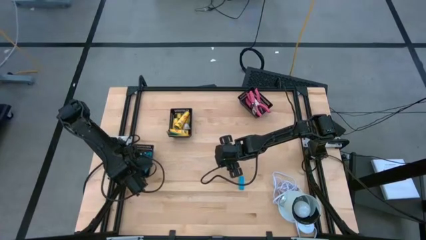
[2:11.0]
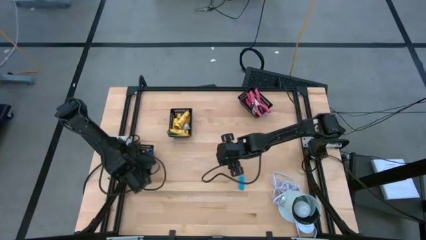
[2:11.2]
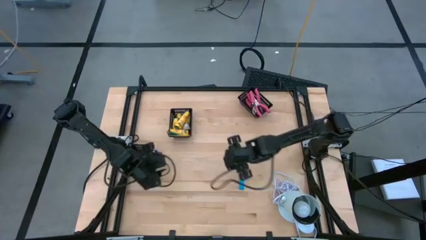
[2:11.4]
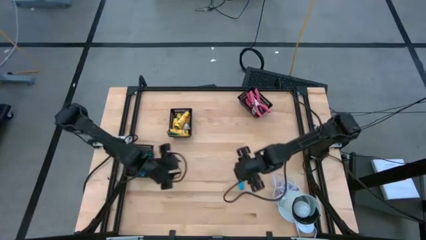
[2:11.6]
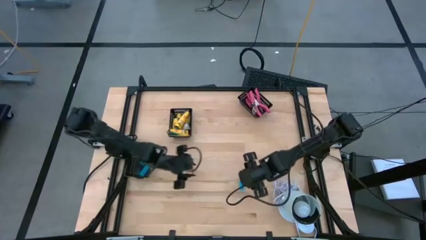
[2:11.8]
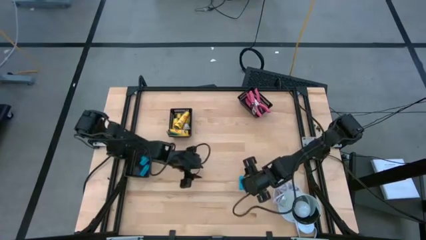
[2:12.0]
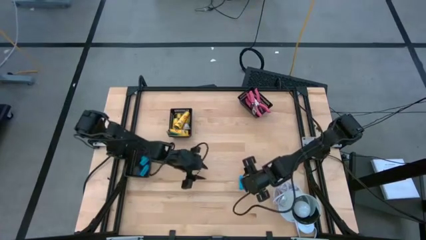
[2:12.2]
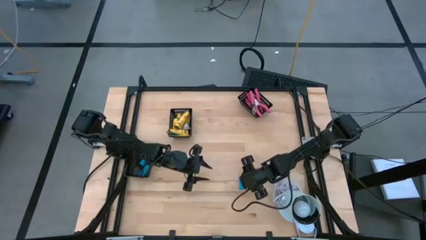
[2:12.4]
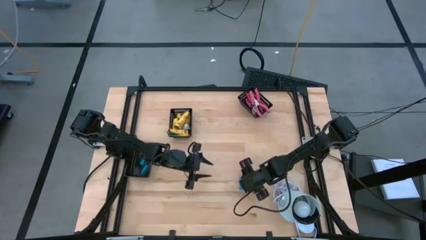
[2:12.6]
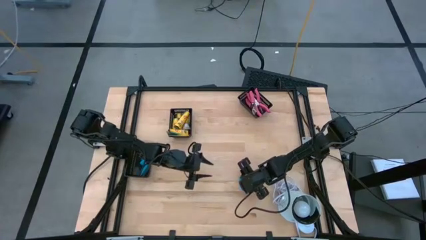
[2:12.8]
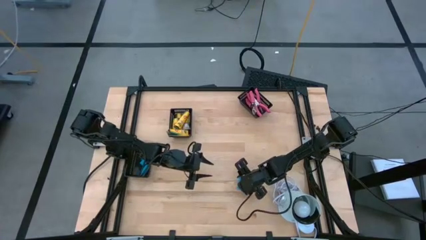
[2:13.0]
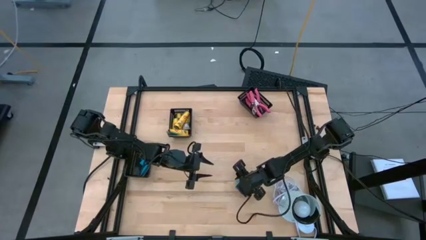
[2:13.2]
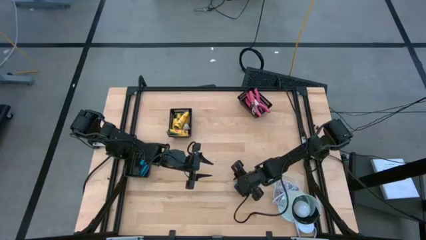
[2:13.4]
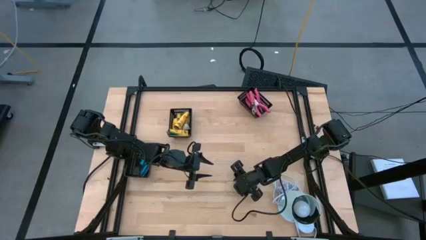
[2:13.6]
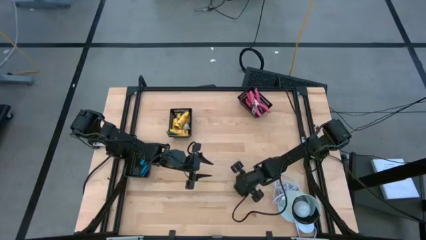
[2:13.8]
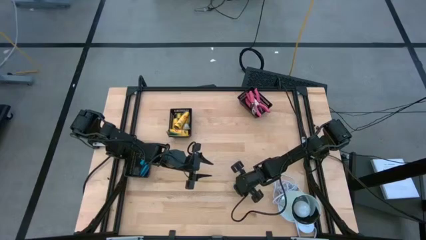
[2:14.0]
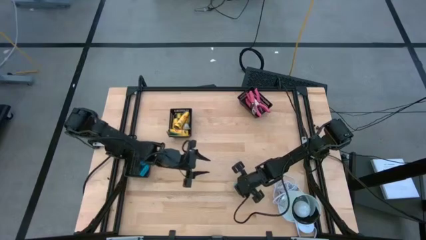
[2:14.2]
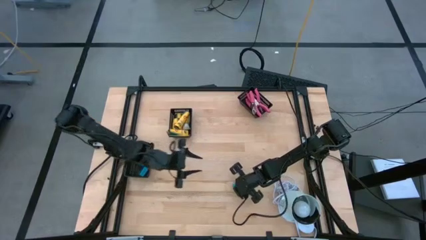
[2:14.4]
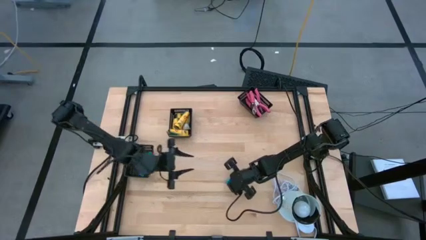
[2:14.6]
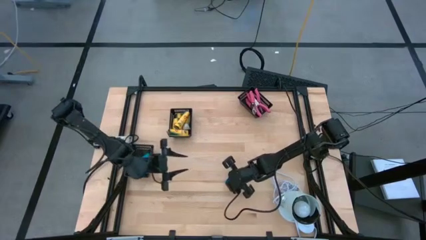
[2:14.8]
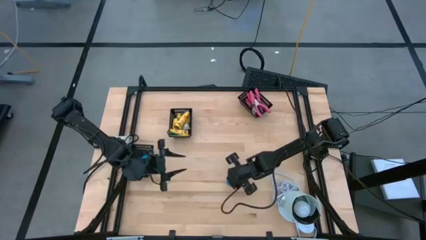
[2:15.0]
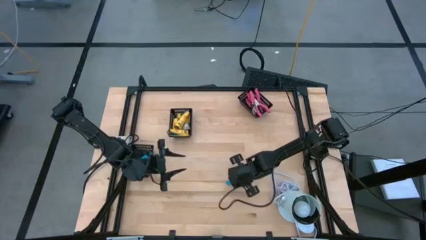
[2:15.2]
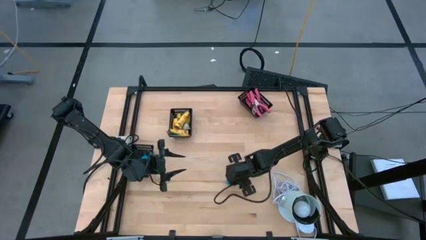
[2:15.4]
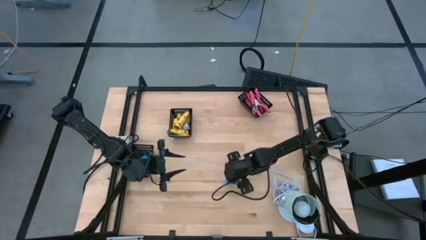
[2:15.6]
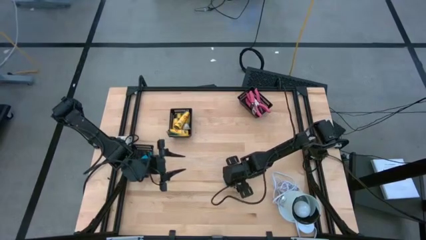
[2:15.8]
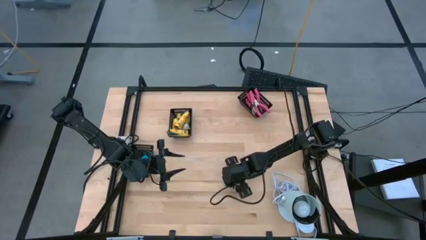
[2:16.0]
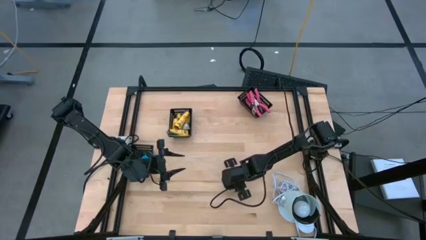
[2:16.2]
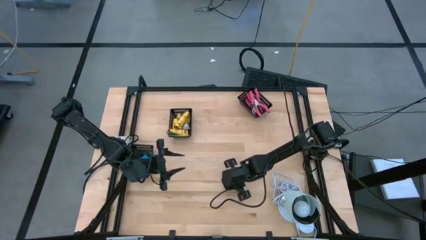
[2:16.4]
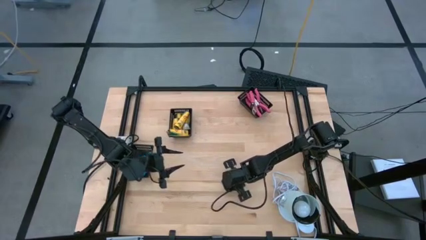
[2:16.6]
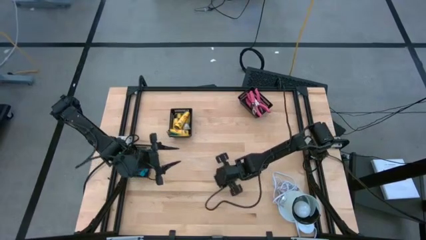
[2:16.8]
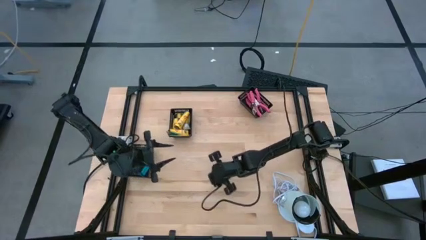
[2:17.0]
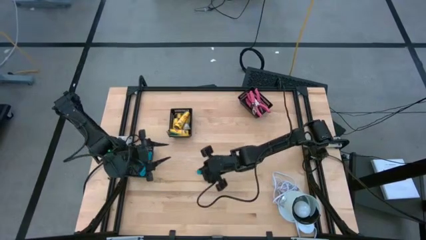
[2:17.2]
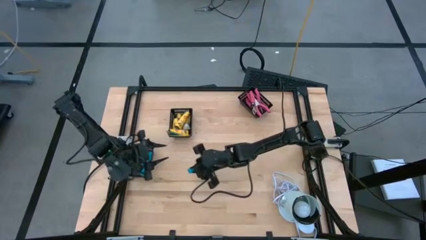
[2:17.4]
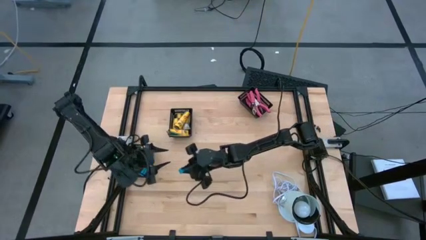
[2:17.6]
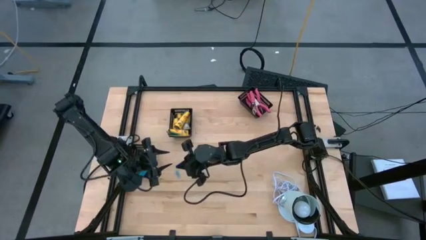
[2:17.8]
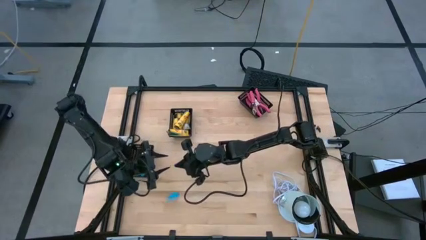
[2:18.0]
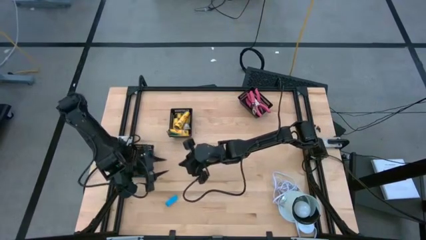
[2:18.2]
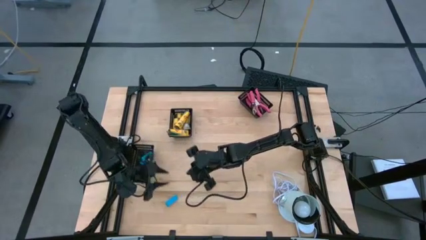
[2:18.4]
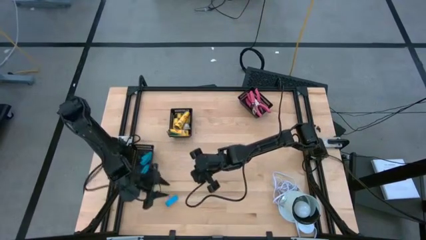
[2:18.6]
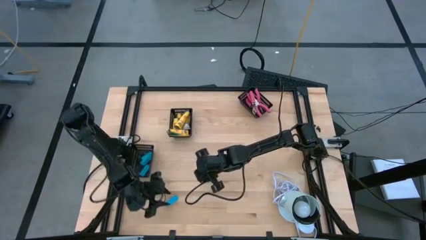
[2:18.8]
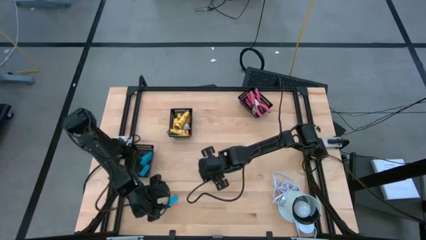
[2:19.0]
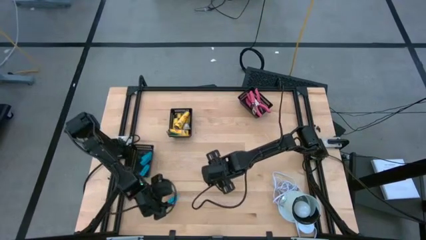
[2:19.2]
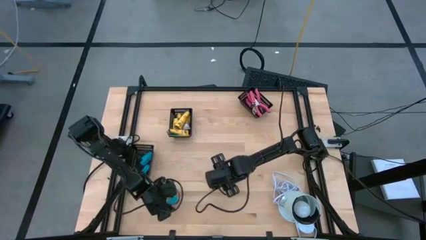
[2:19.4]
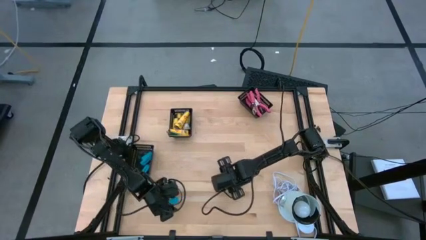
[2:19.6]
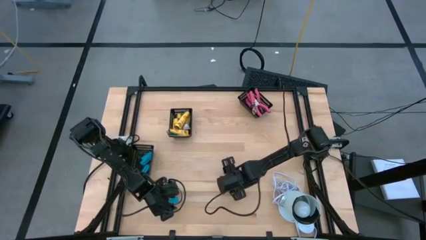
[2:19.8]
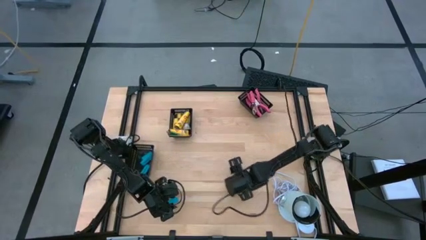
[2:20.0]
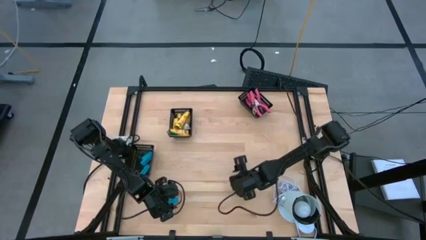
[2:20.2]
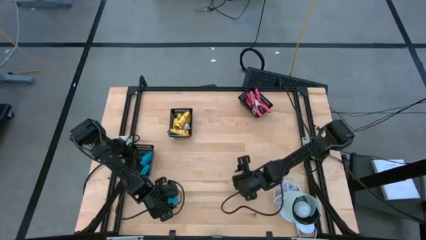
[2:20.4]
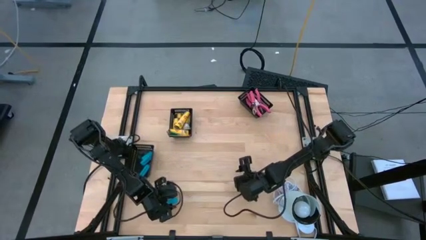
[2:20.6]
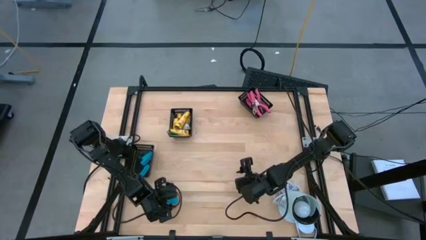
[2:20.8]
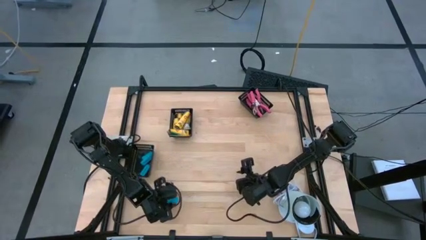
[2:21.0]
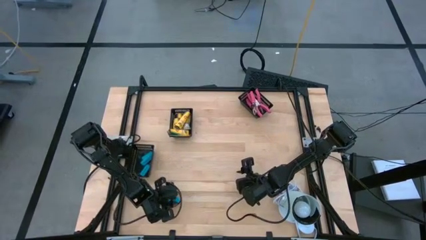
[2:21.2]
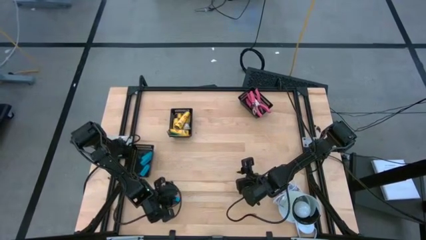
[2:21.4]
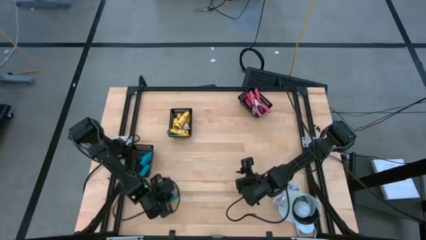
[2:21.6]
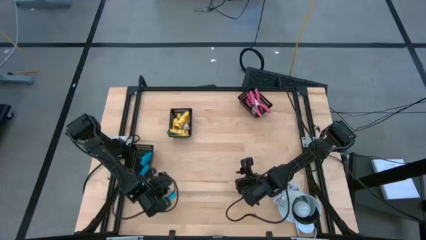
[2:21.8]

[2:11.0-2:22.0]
Task: Pick & Place School Supplies
Put the blue eraser into the bottom black bin

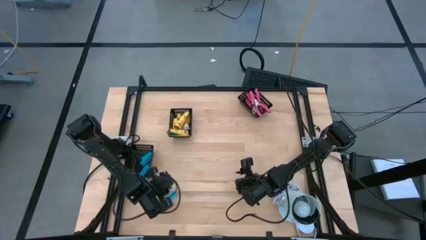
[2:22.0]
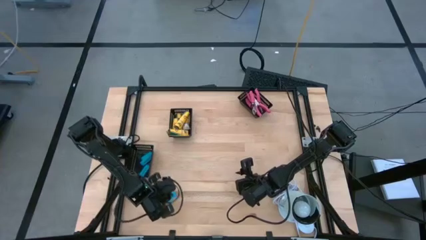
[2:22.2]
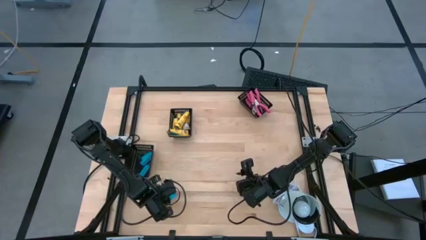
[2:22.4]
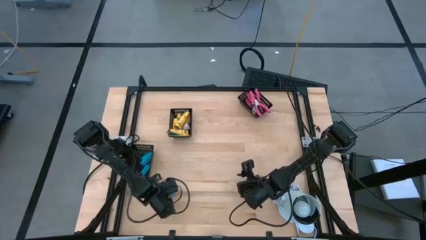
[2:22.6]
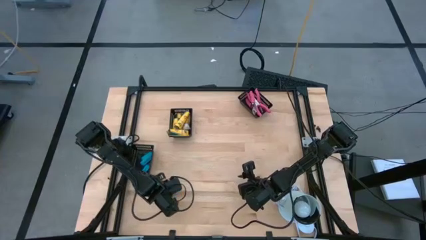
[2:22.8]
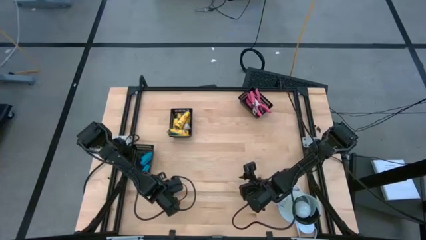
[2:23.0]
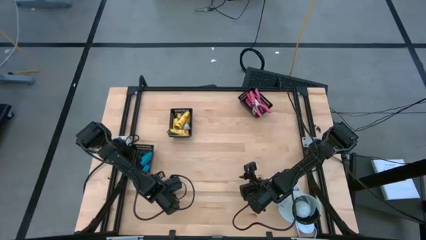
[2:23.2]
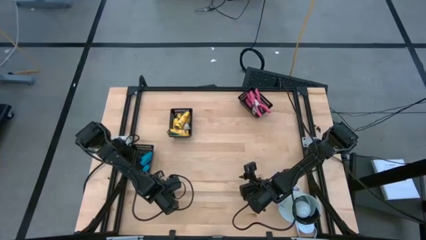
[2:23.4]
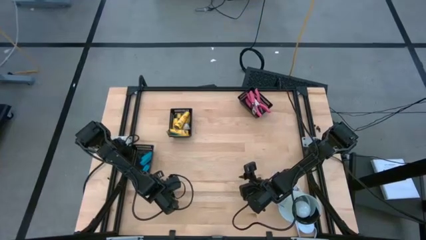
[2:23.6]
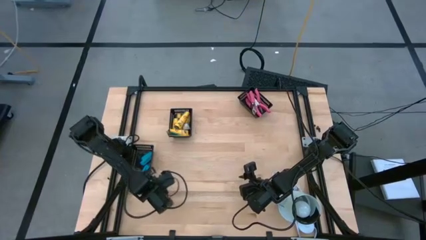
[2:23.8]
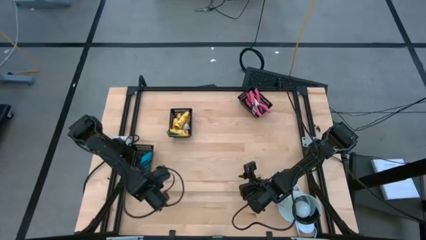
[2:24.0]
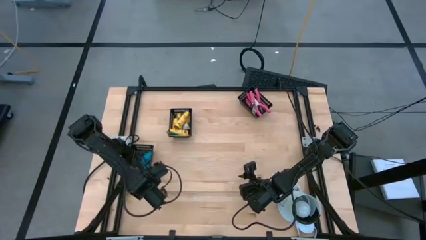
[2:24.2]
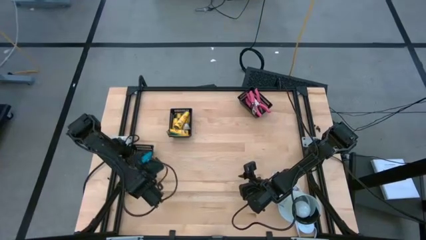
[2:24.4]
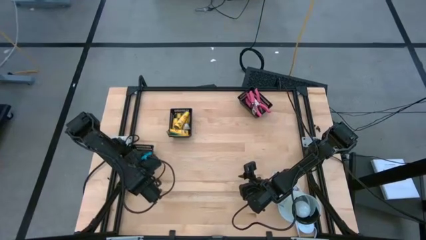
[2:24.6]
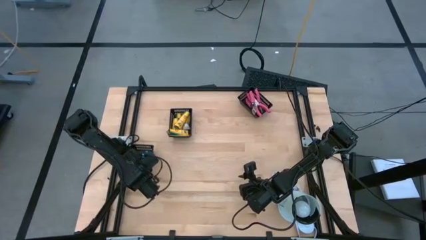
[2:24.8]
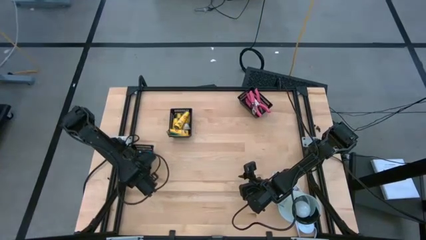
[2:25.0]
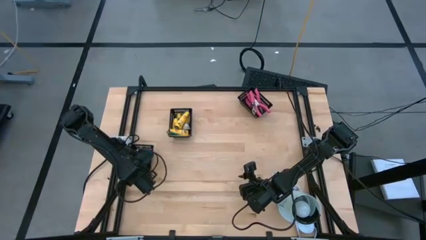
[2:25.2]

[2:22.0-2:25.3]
Put the blue eraser into the bottom black bin

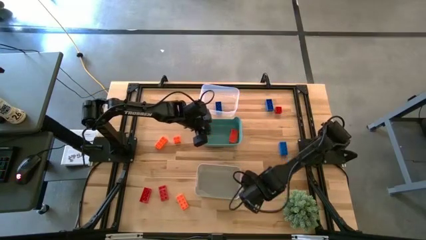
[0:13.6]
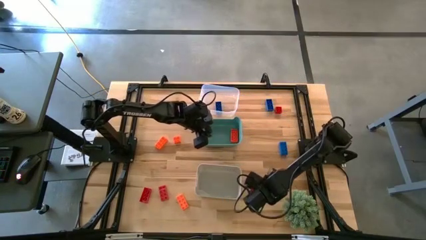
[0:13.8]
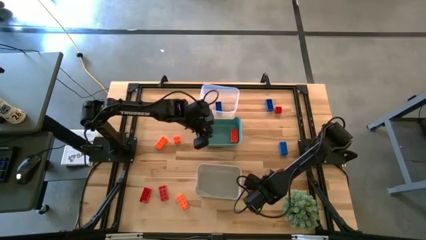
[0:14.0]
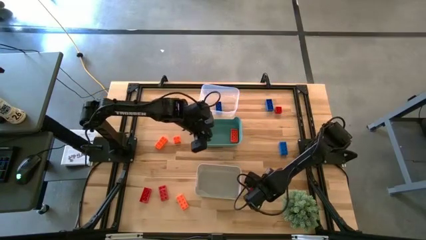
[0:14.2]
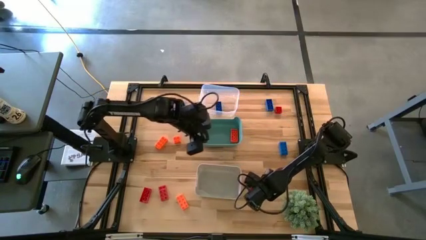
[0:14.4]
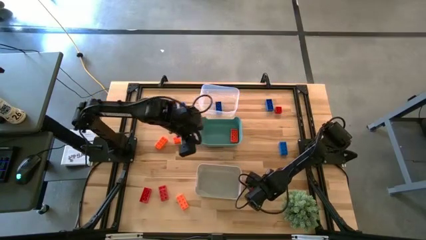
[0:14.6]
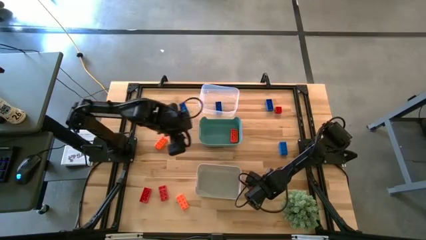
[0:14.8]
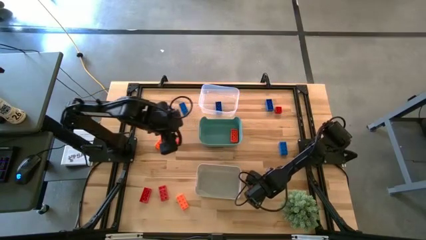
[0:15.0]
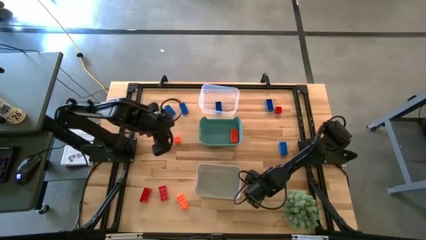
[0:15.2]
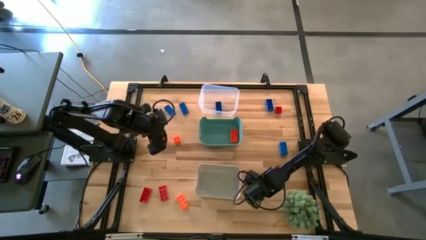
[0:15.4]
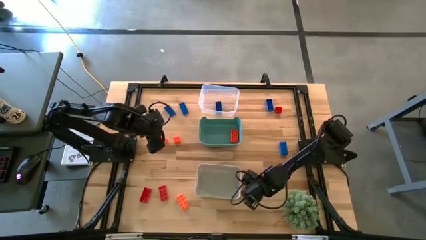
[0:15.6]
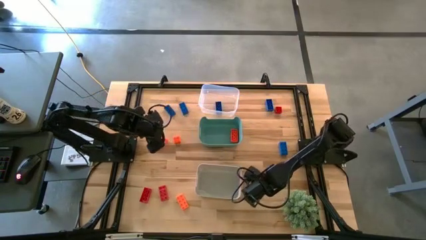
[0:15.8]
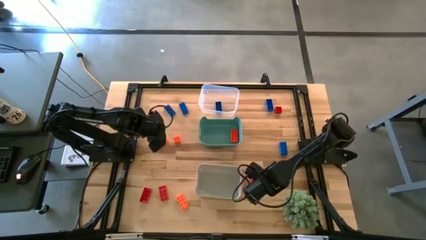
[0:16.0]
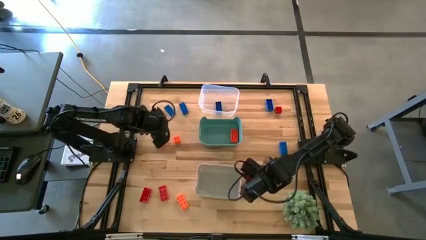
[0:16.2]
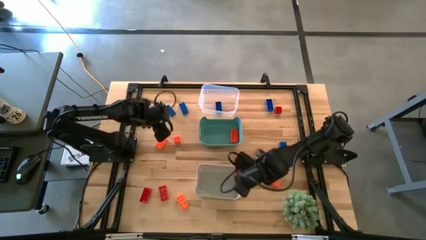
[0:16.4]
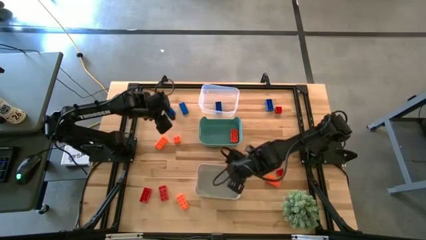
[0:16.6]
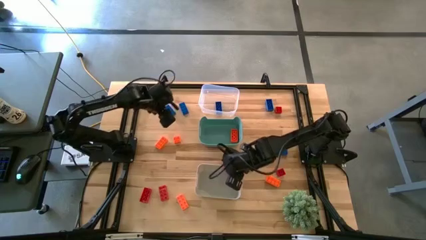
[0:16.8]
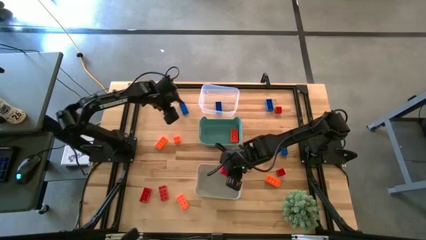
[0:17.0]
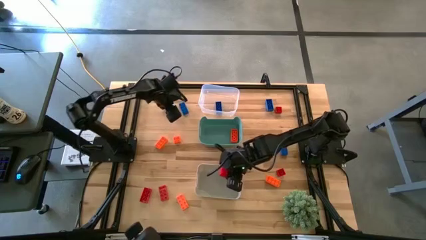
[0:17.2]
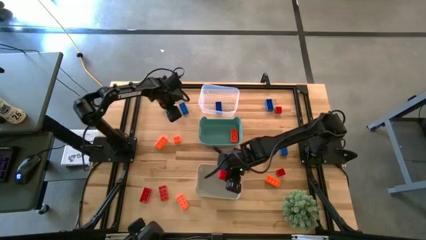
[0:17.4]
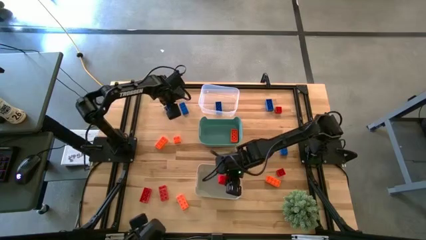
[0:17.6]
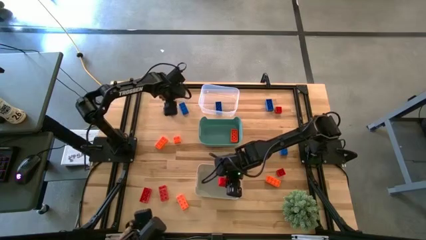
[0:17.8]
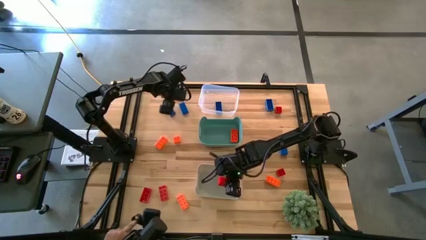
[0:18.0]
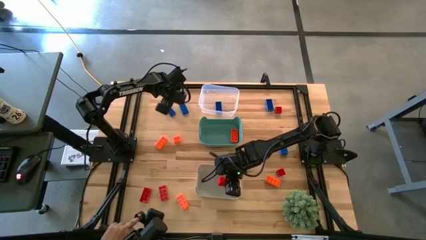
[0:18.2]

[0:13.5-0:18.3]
Task: Sort & place blocks by color
Put the red game piece into the white bin
